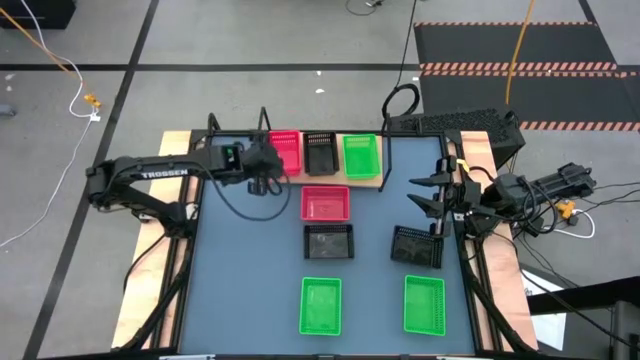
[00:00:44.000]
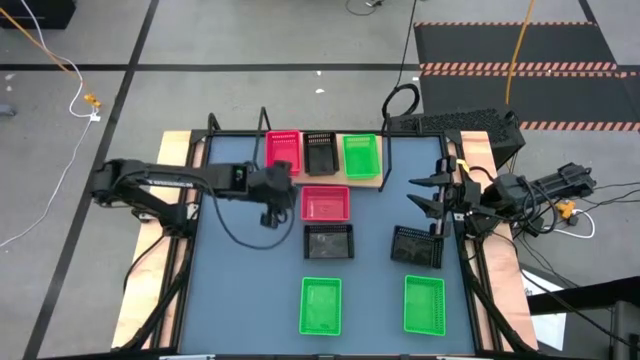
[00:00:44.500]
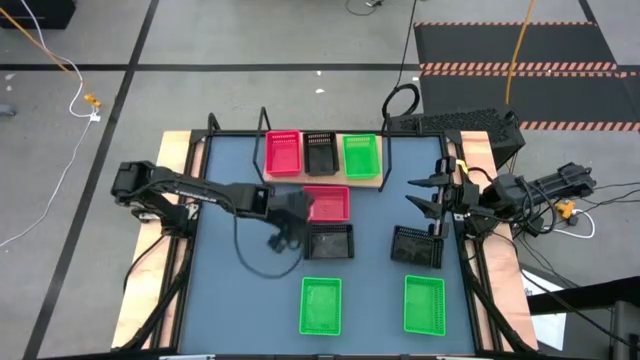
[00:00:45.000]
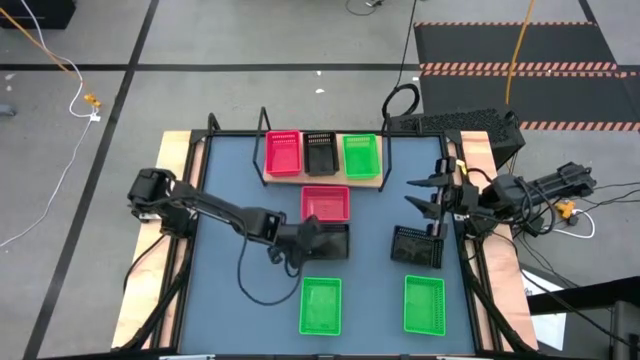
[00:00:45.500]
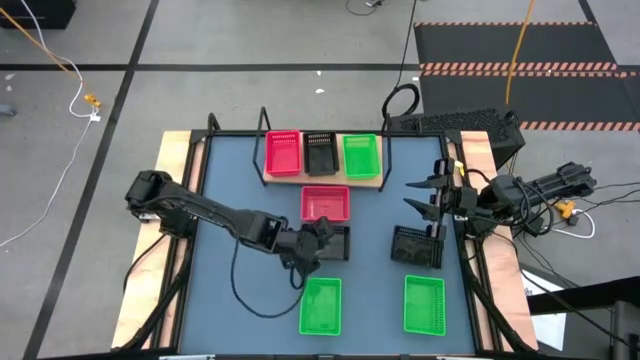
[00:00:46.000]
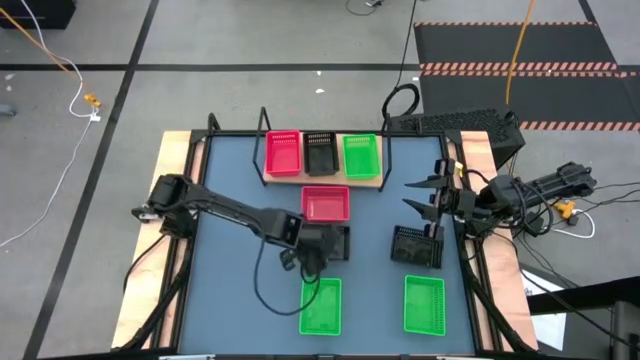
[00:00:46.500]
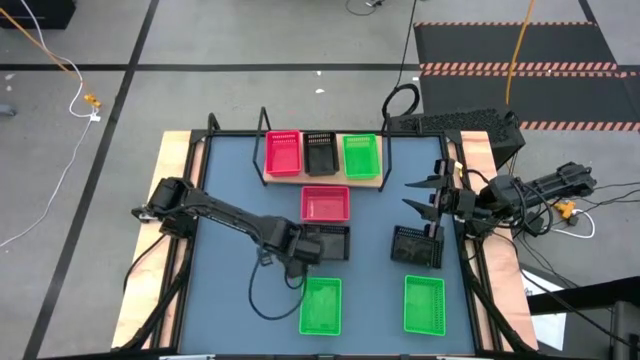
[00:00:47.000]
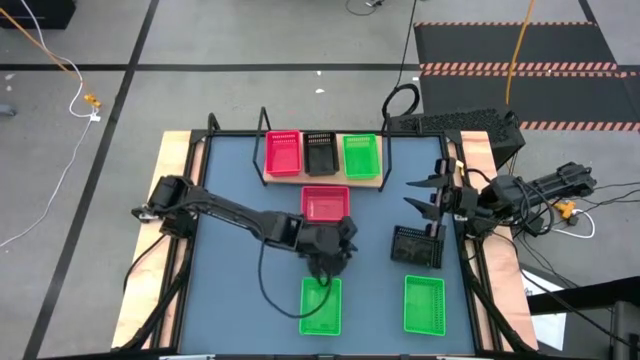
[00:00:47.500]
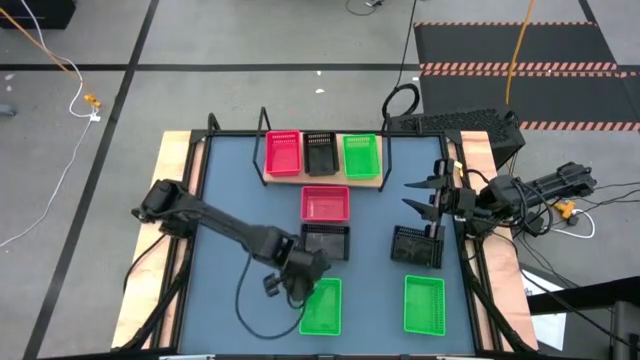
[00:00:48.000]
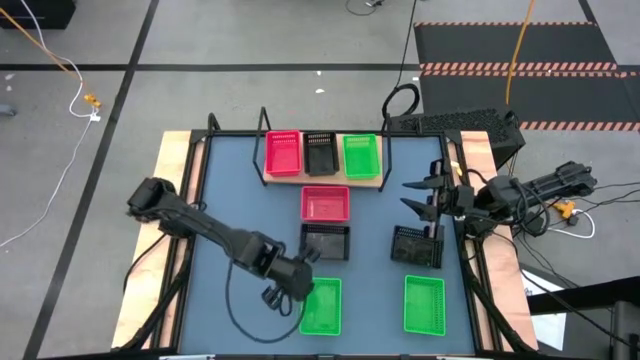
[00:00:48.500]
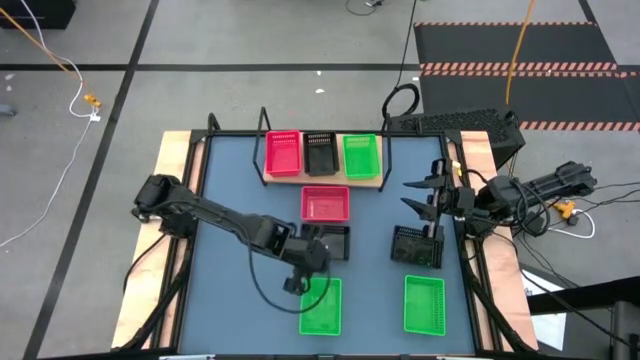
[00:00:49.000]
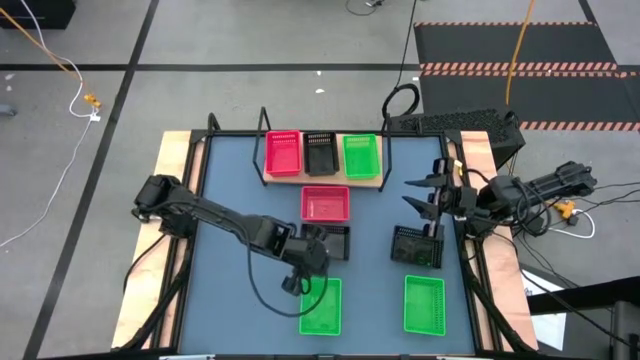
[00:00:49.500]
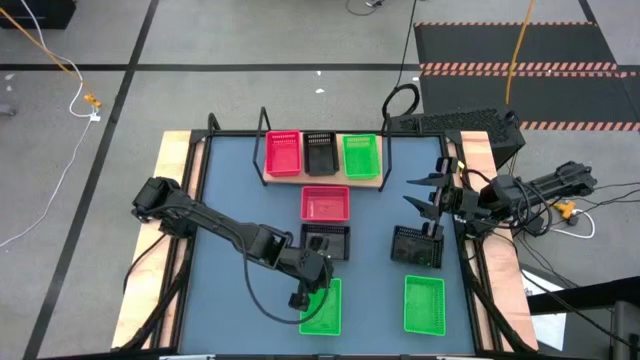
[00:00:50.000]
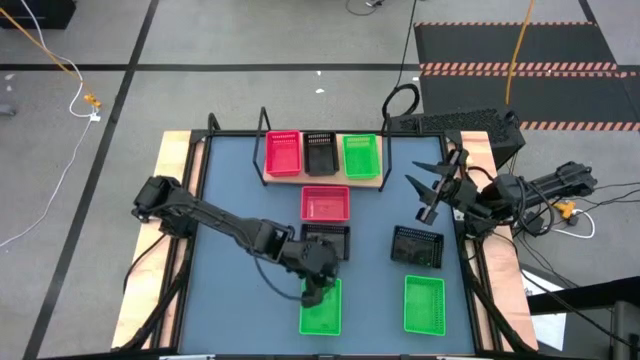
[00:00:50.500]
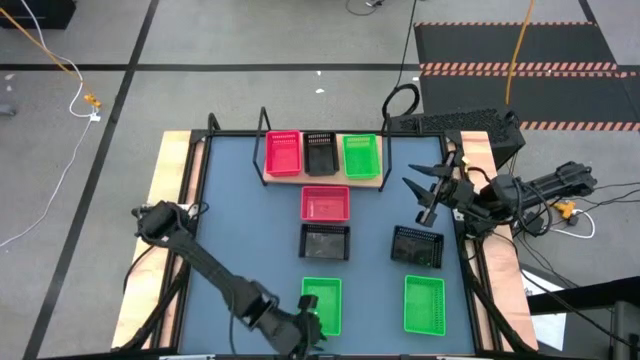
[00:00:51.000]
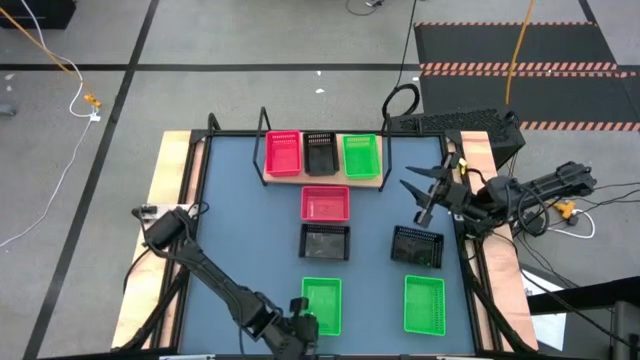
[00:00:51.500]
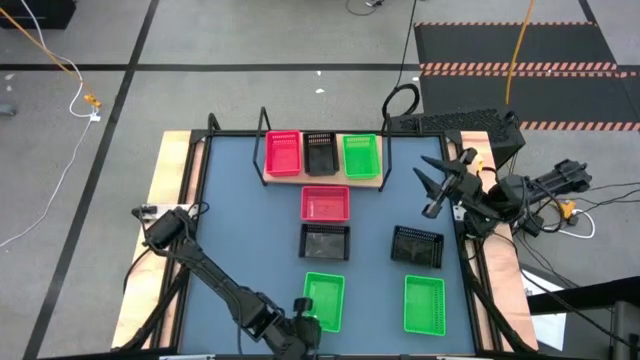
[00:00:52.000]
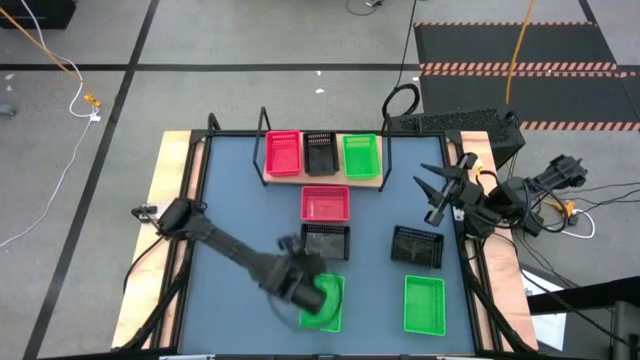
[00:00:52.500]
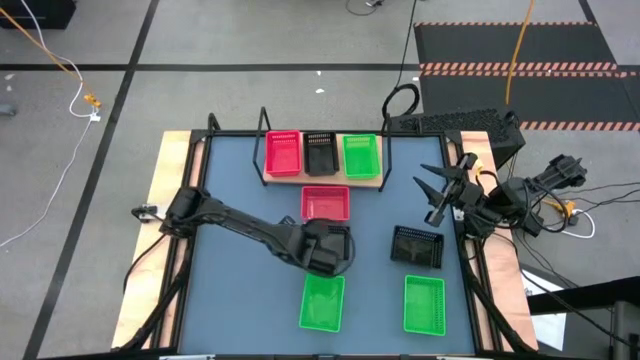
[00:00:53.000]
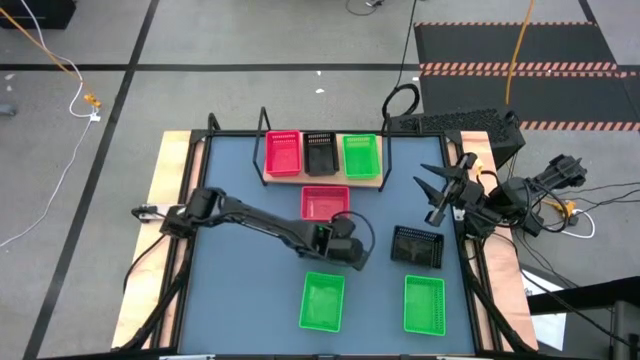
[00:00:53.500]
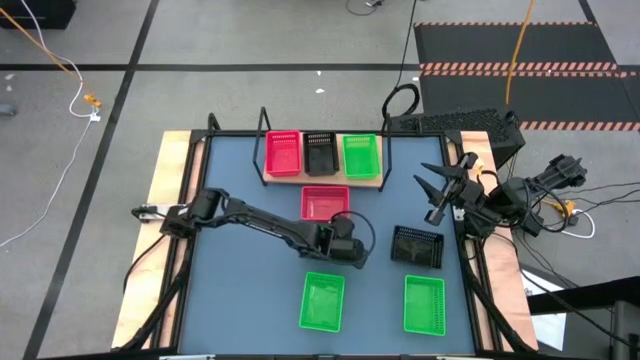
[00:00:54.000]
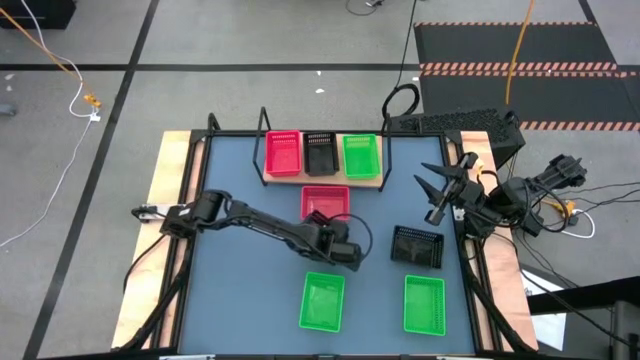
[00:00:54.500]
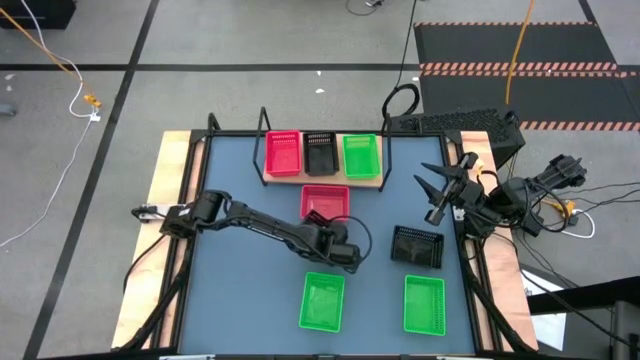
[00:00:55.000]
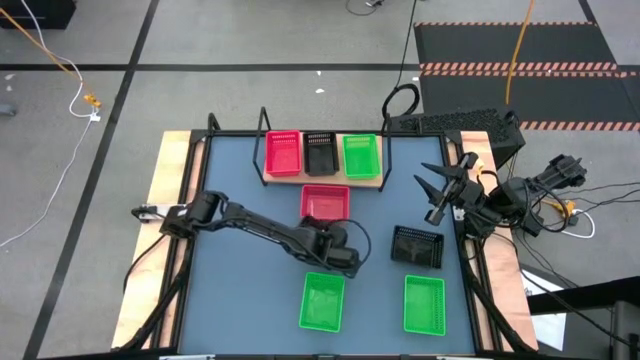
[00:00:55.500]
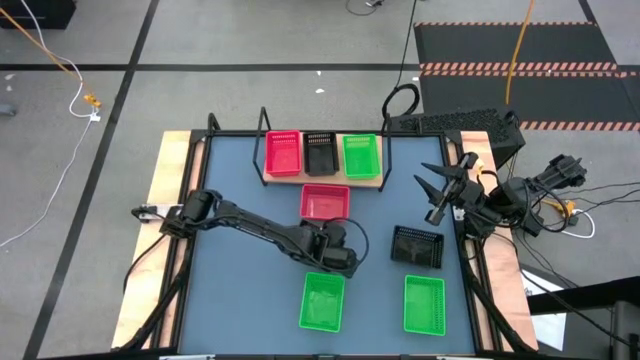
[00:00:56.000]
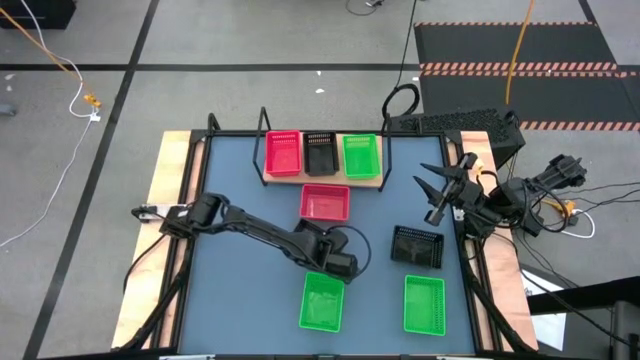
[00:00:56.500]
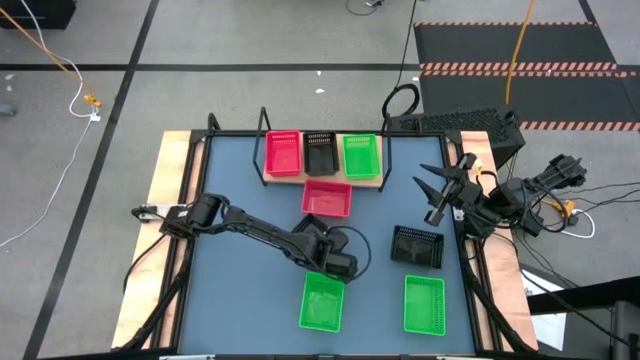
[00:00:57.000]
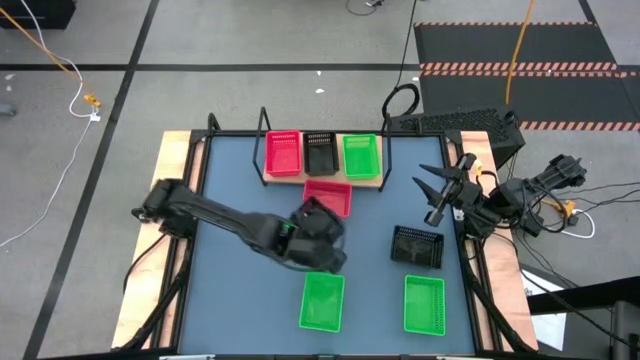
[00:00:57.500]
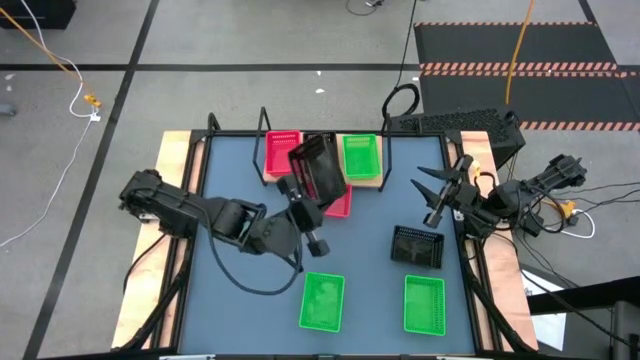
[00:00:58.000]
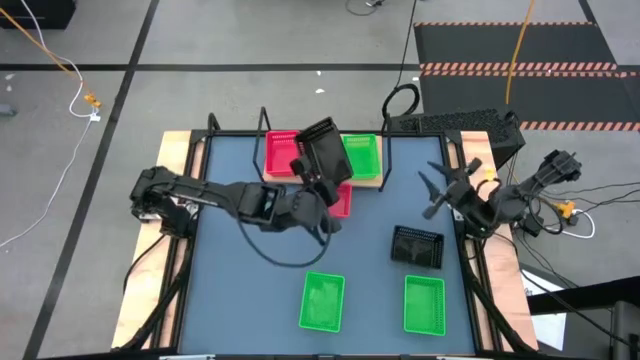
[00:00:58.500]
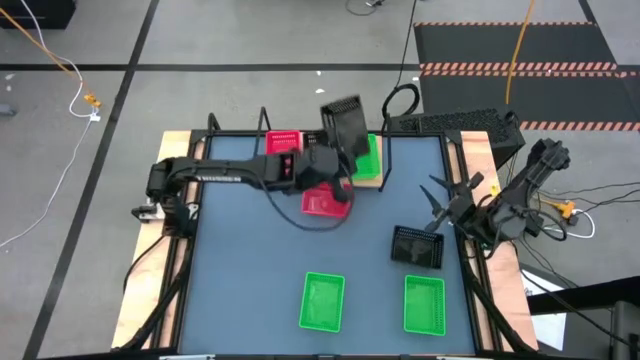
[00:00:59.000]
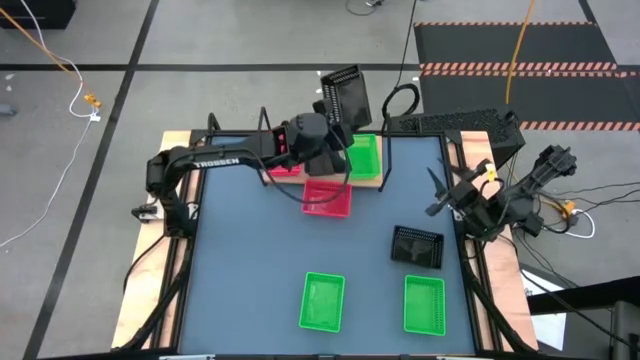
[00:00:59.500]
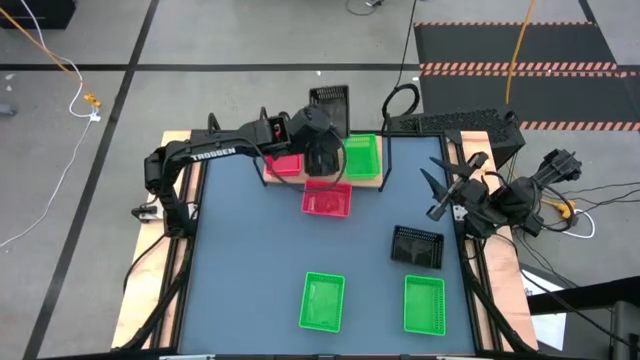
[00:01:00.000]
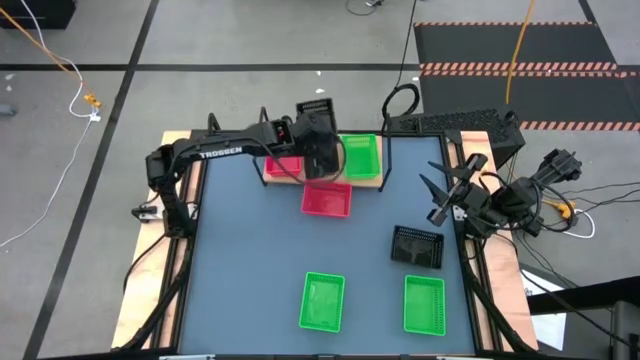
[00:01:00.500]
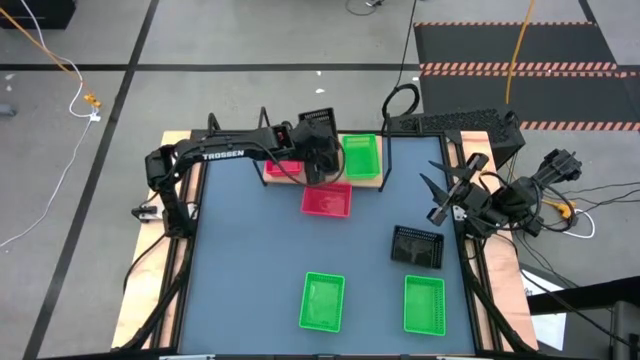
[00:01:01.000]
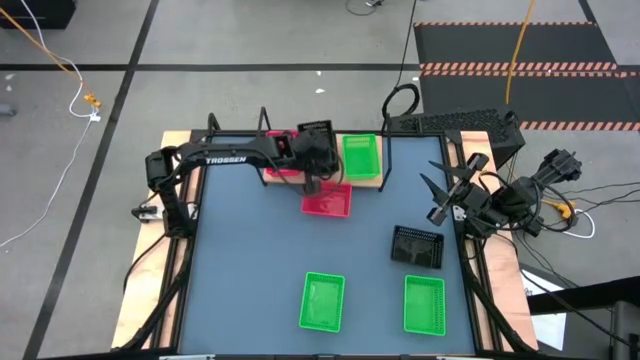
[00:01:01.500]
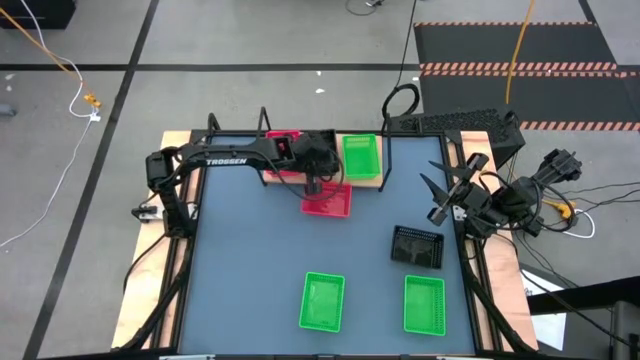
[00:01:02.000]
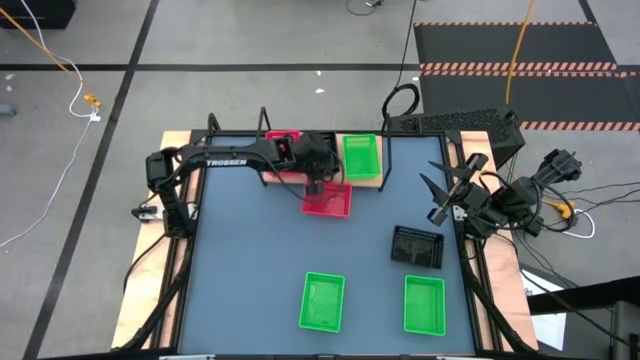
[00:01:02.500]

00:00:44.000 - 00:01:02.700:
Task: Stack baskets on shelf by color
Stack the left black basket on the black basket on the shelf

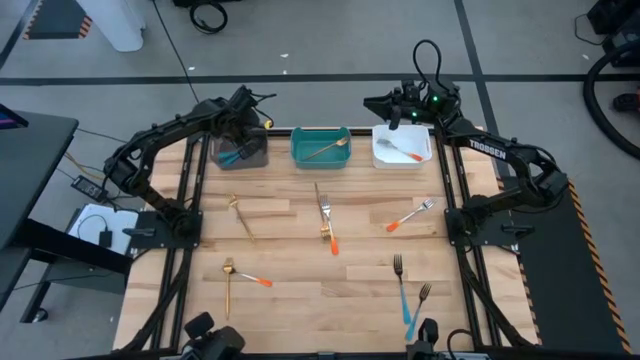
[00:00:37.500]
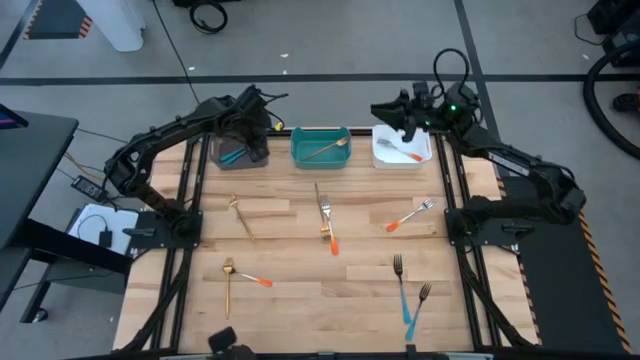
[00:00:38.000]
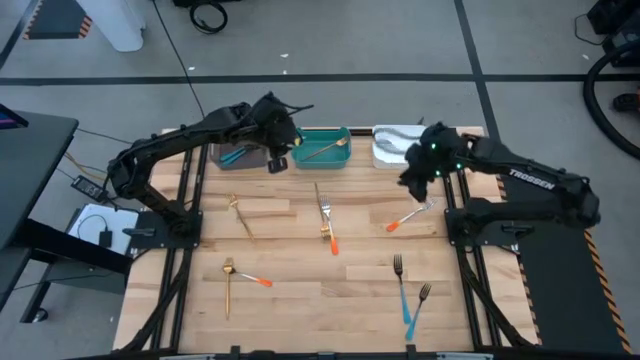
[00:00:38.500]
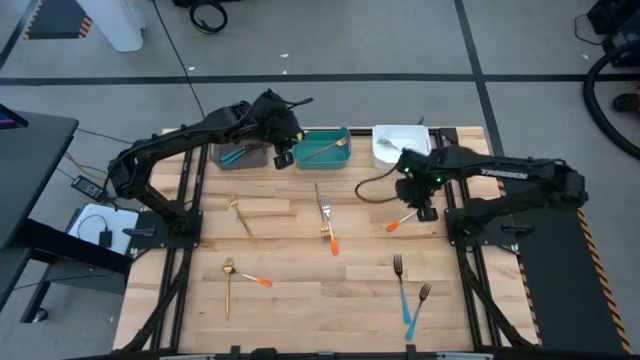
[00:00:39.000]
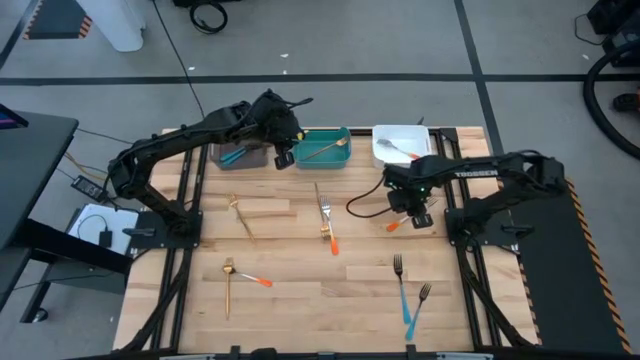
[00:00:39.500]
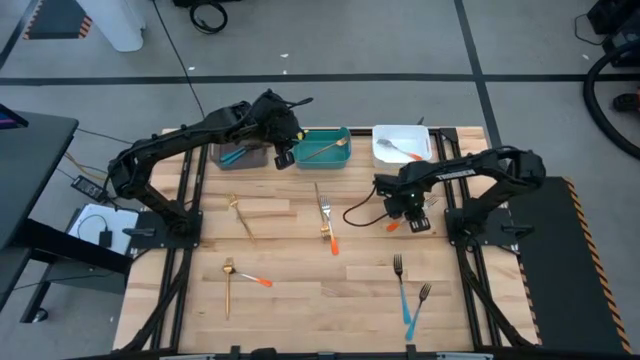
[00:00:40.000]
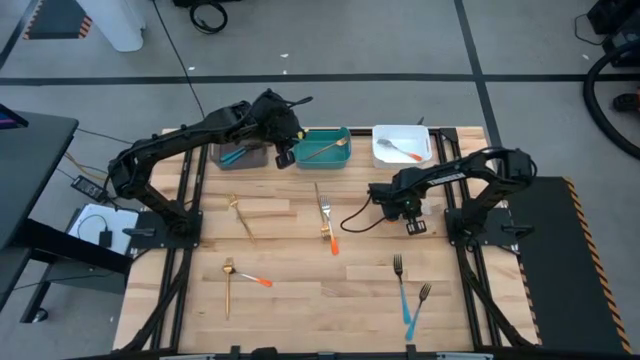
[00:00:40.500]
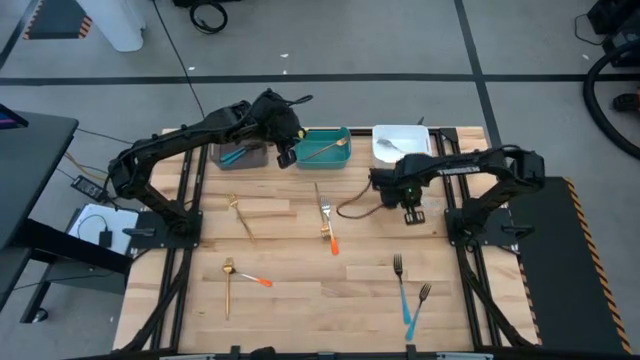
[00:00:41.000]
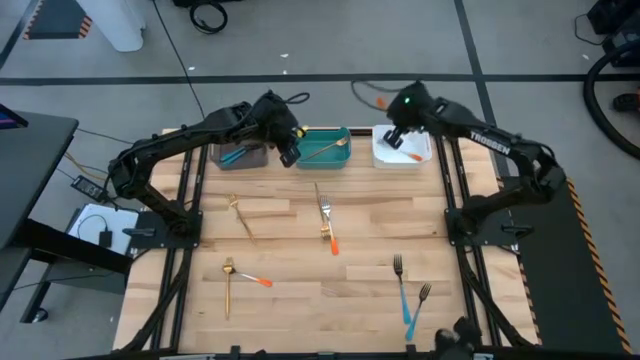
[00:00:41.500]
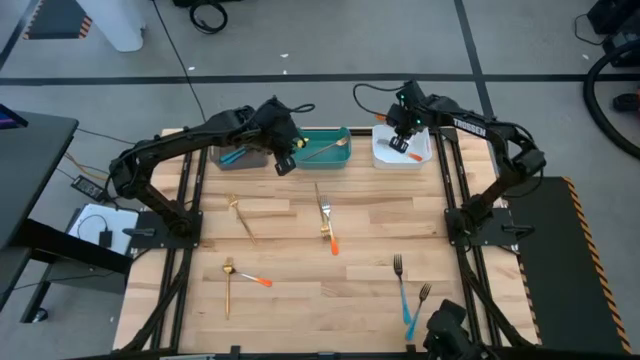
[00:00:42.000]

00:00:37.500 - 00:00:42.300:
Task: Sort silverware by color (type)
Put the orange fork into the white bin
